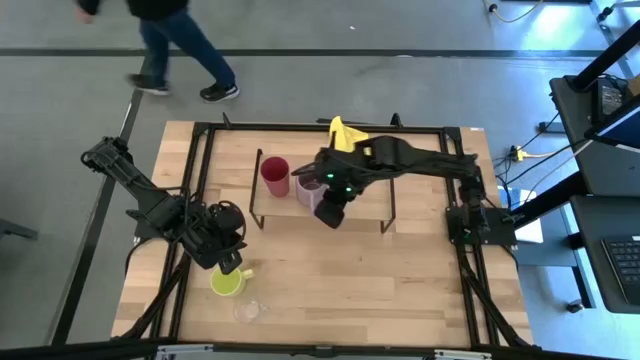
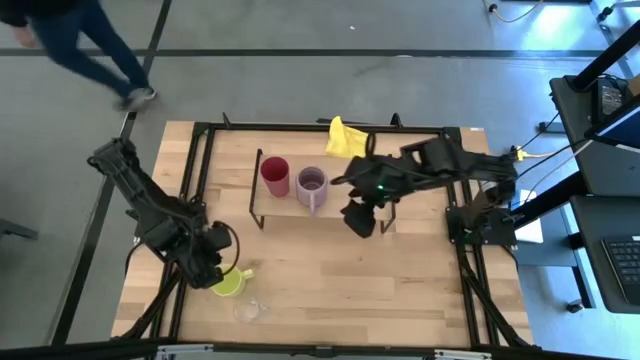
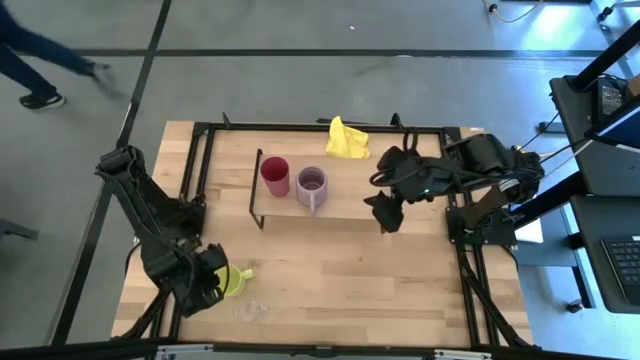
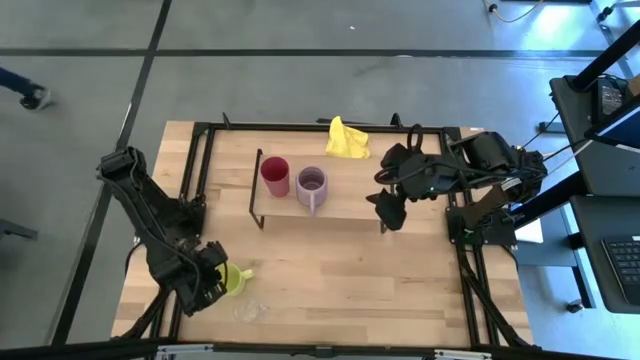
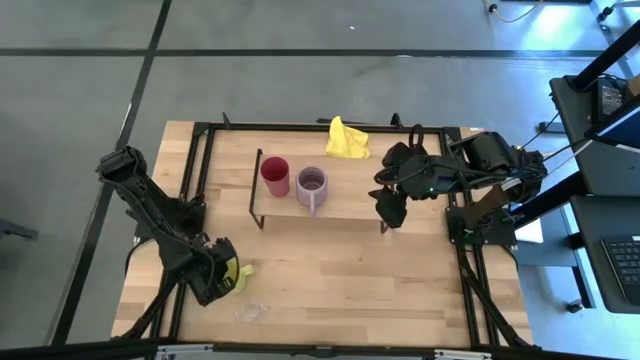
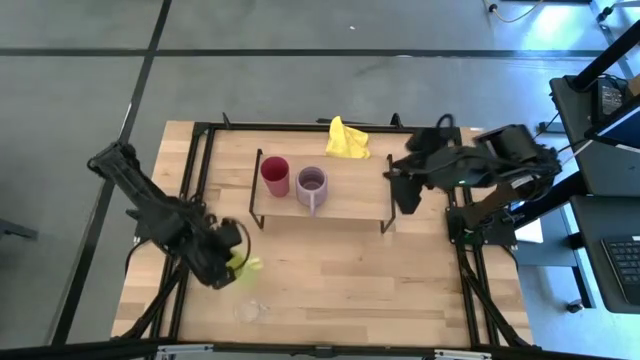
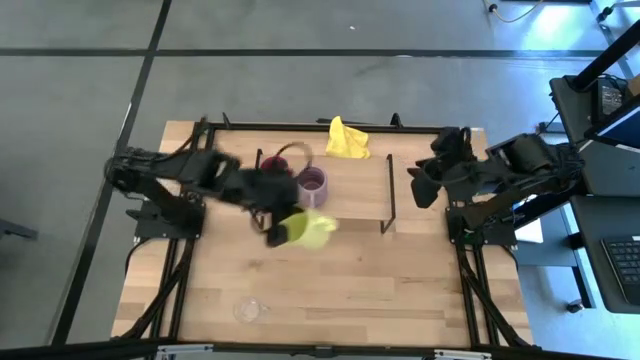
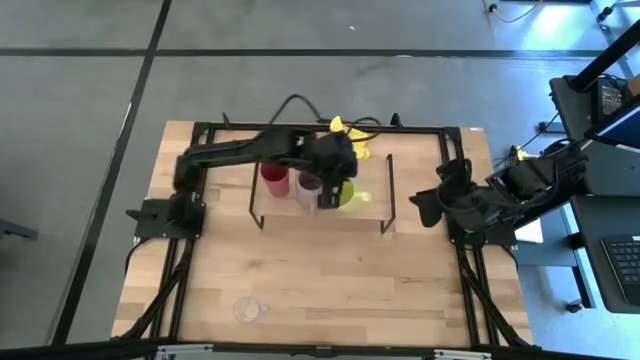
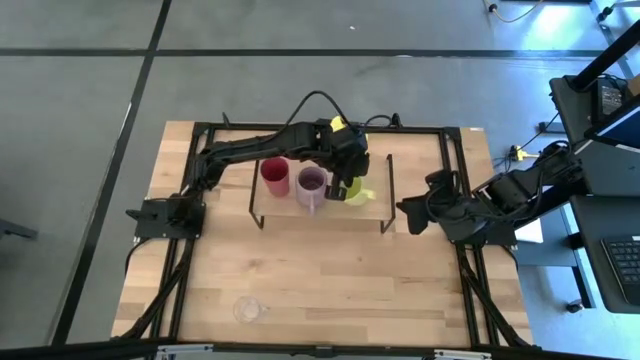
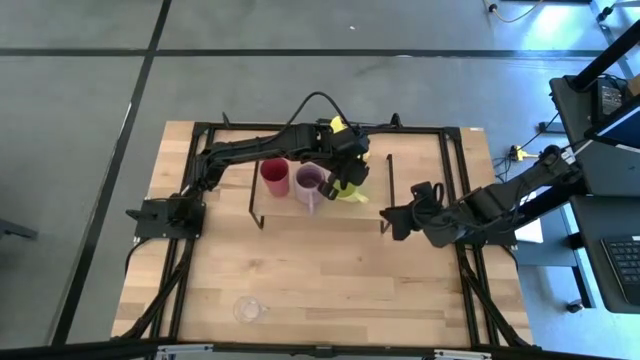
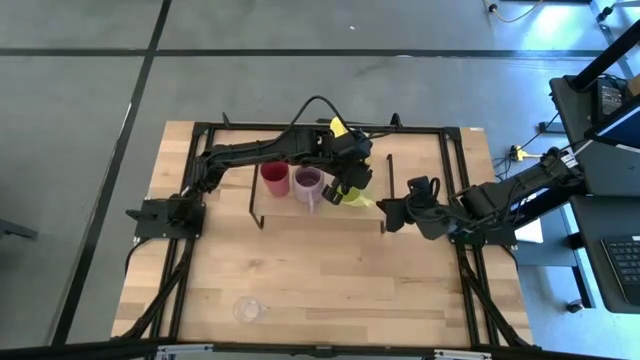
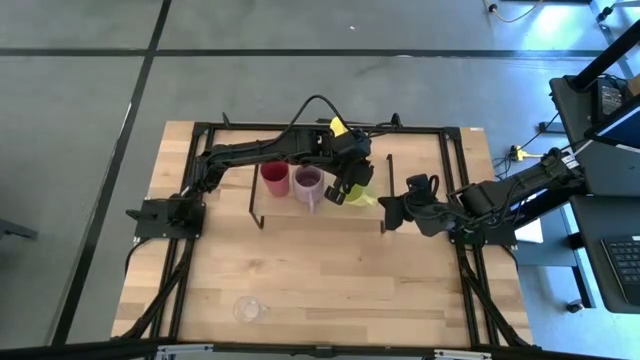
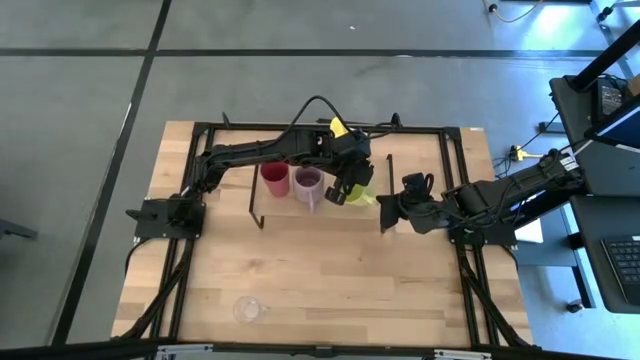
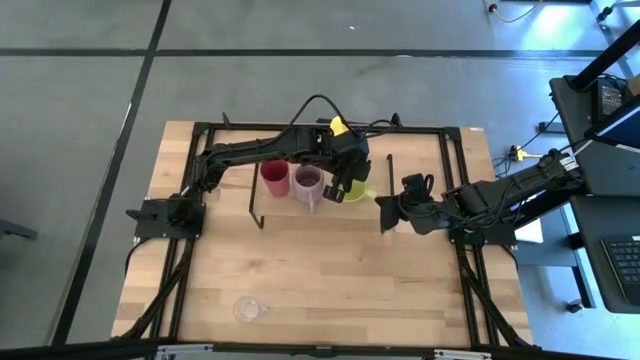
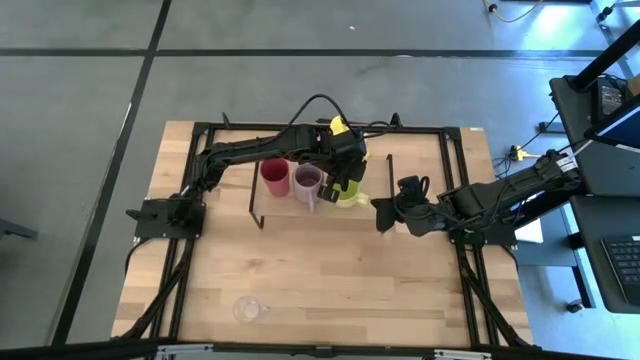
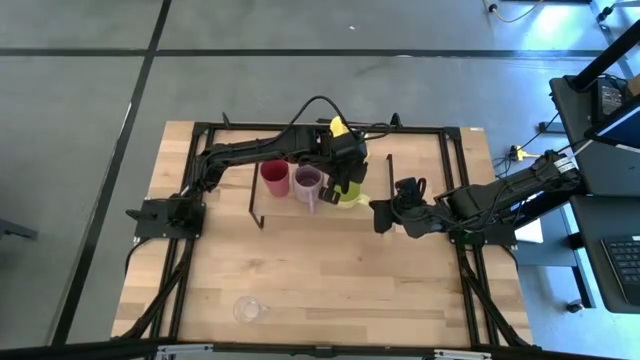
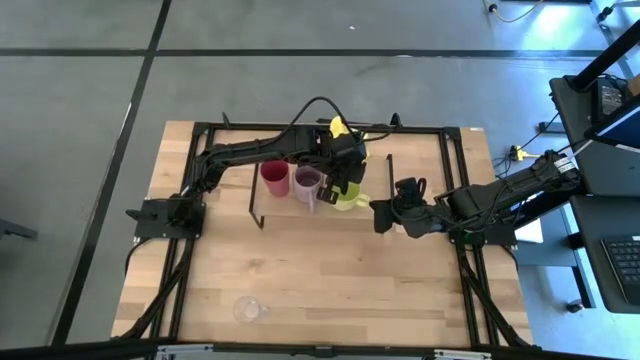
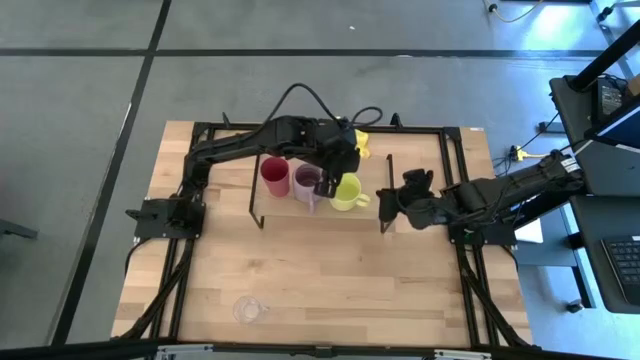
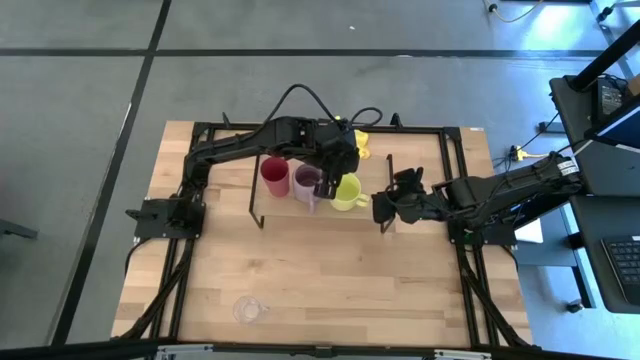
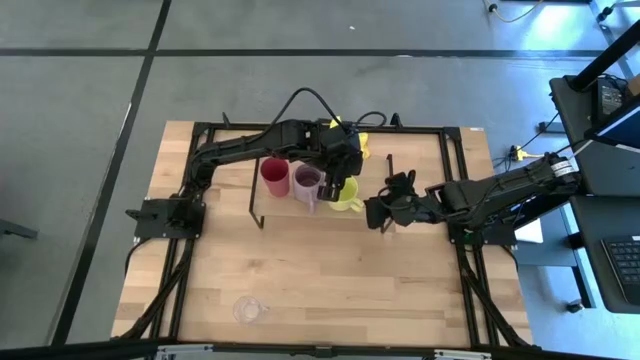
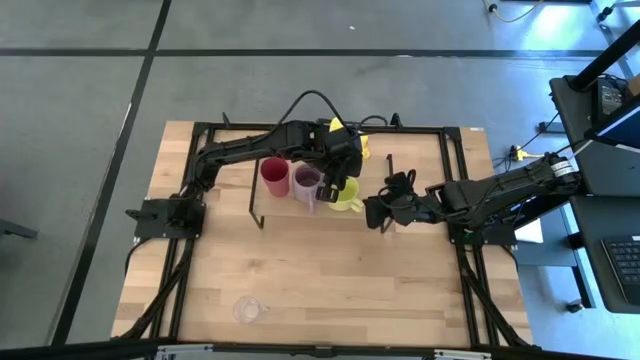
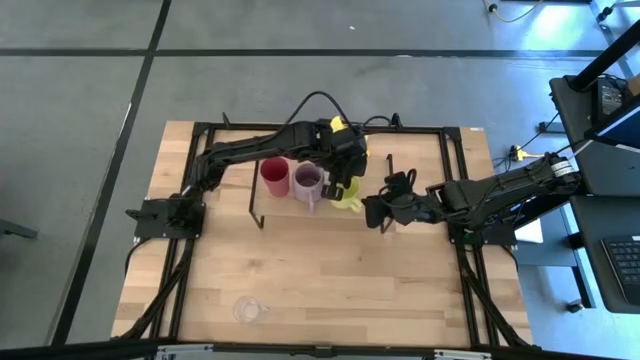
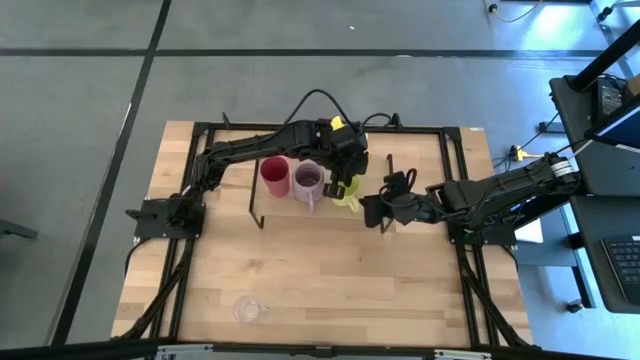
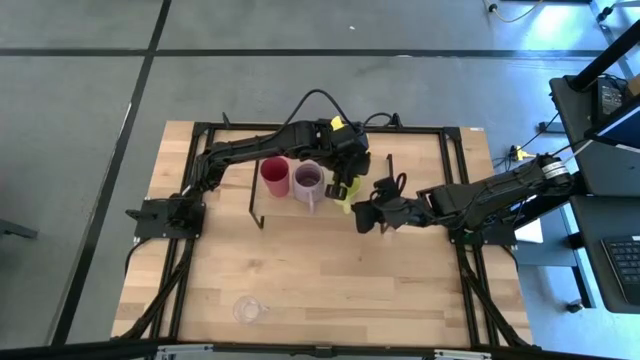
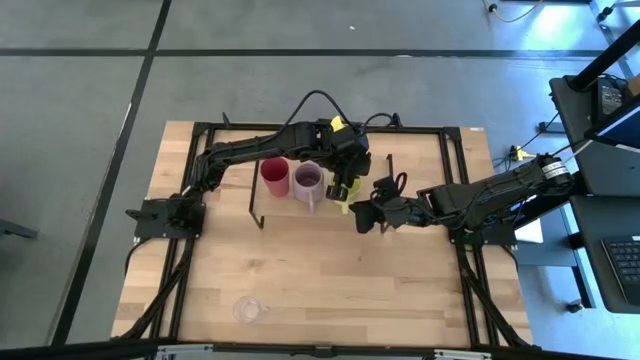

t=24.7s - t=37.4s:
Task: Stack small to large cups/mugs on shelf
Put the yellow mug on the shelf
